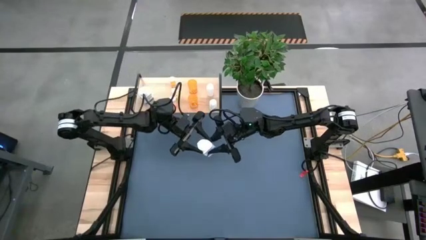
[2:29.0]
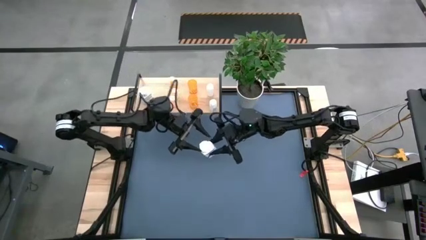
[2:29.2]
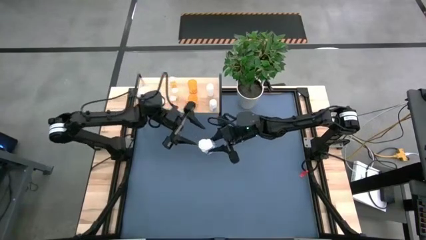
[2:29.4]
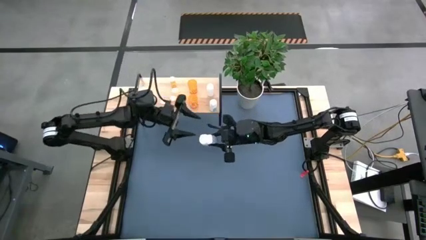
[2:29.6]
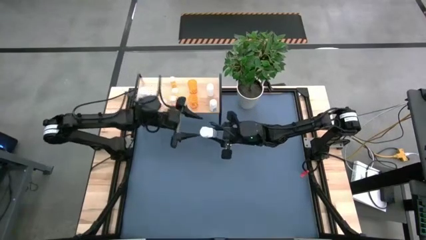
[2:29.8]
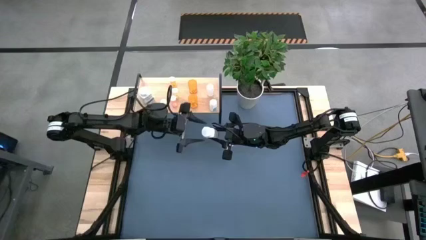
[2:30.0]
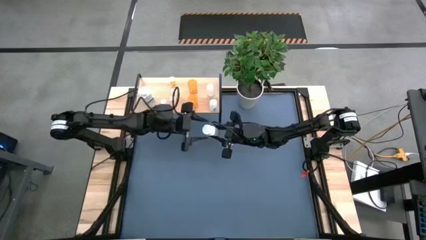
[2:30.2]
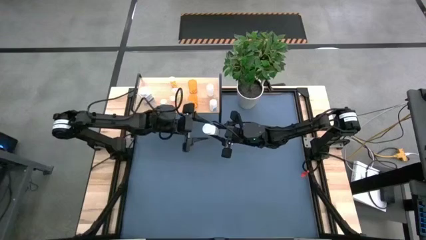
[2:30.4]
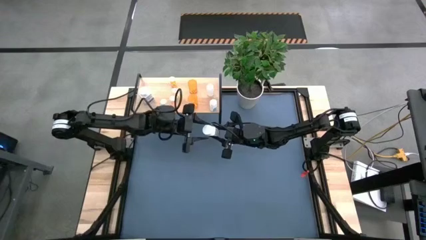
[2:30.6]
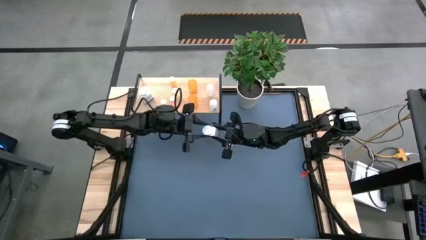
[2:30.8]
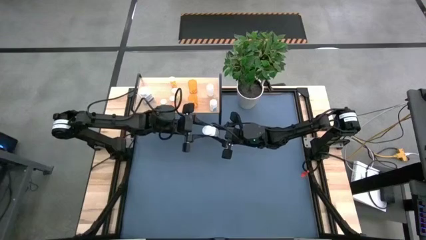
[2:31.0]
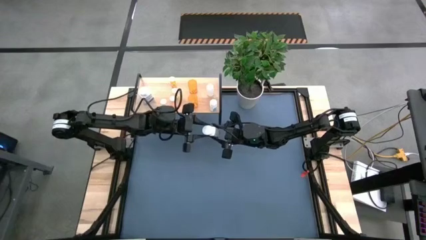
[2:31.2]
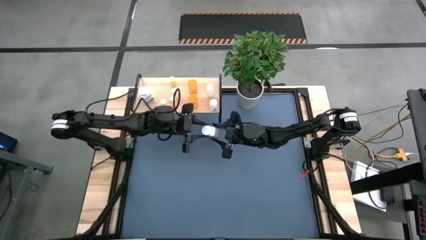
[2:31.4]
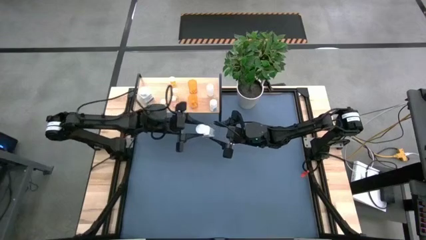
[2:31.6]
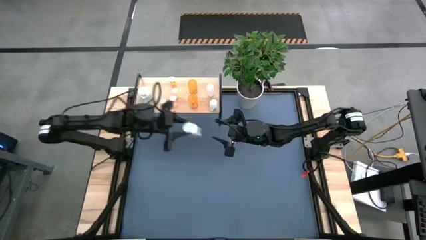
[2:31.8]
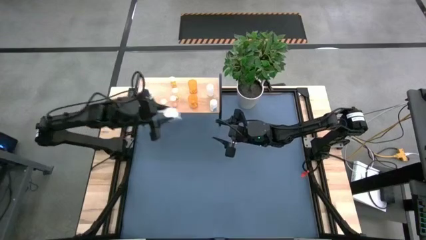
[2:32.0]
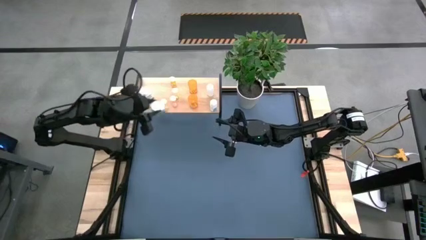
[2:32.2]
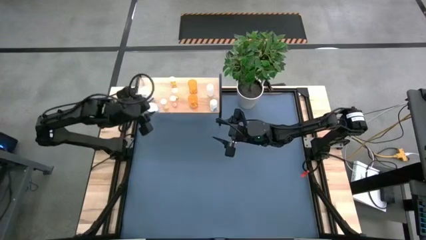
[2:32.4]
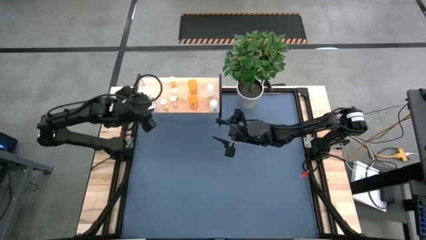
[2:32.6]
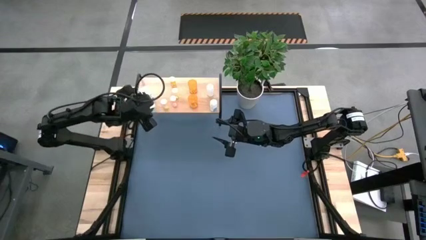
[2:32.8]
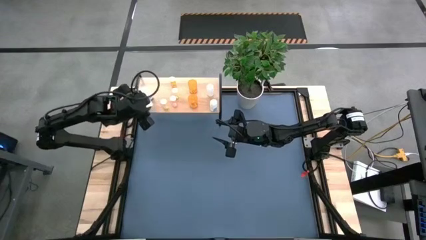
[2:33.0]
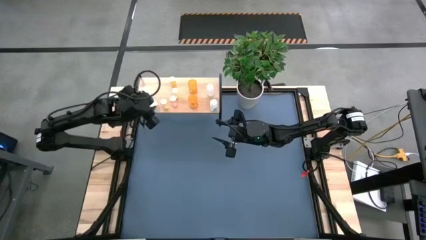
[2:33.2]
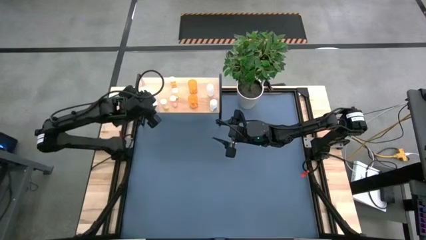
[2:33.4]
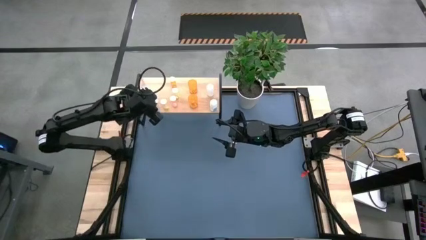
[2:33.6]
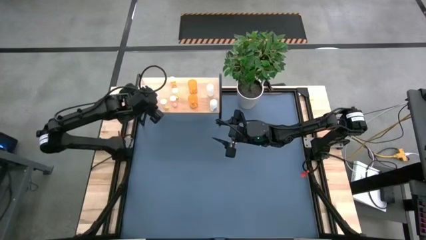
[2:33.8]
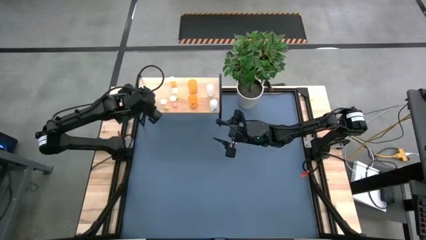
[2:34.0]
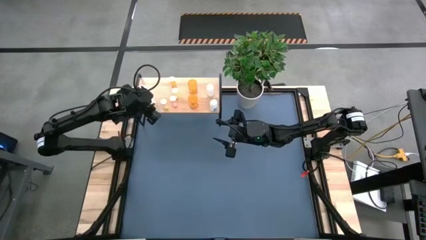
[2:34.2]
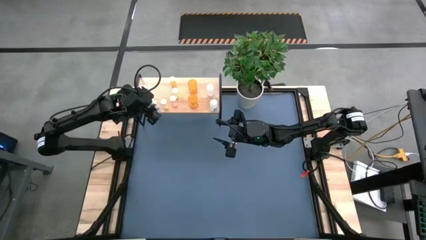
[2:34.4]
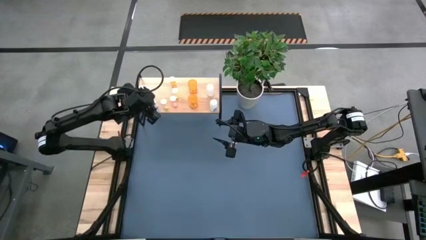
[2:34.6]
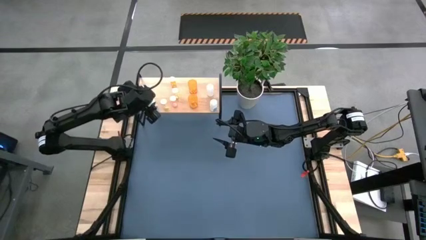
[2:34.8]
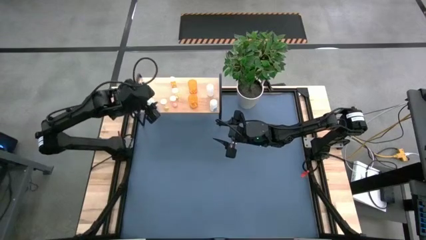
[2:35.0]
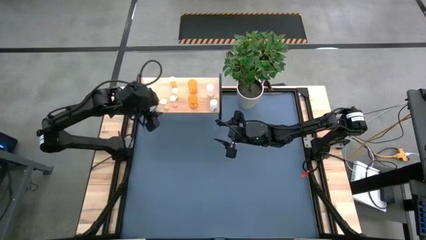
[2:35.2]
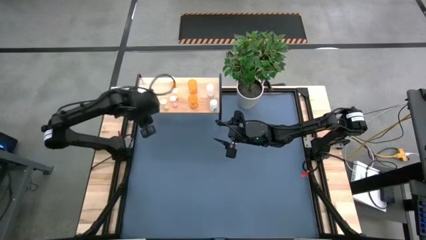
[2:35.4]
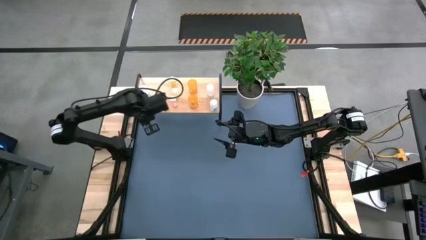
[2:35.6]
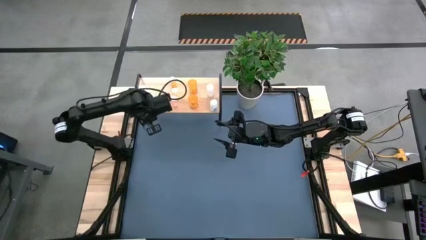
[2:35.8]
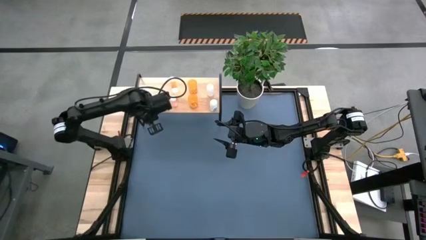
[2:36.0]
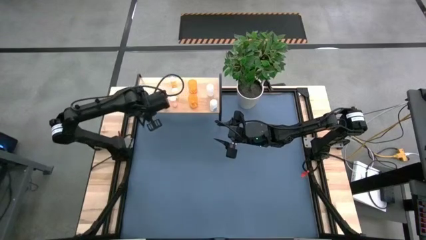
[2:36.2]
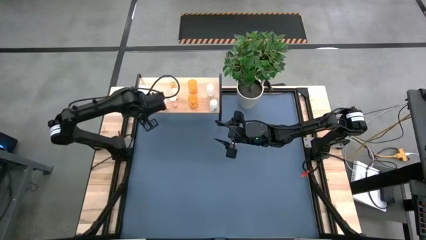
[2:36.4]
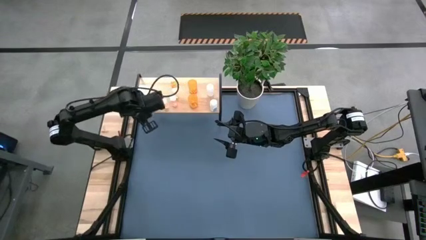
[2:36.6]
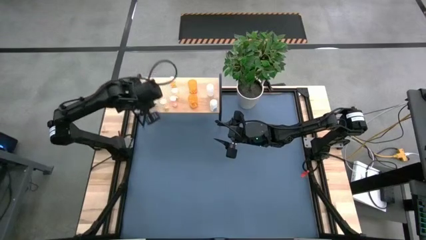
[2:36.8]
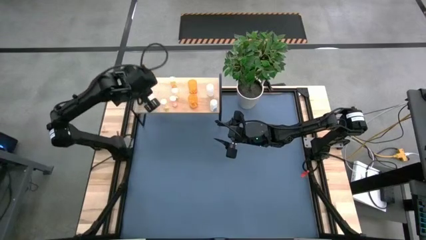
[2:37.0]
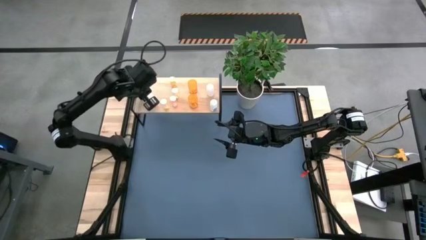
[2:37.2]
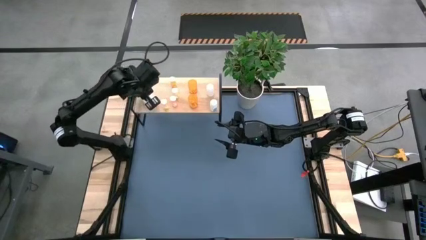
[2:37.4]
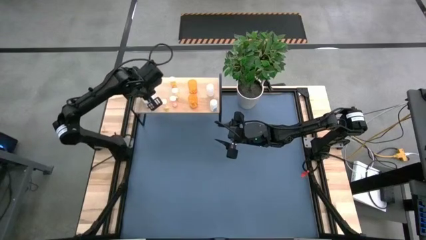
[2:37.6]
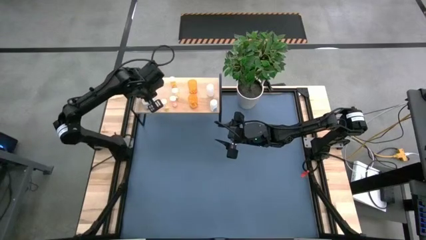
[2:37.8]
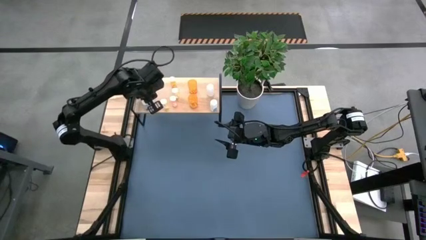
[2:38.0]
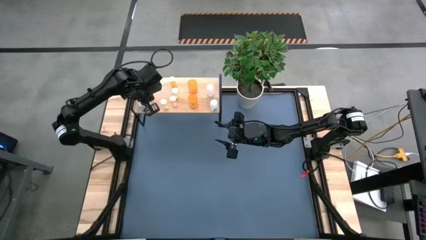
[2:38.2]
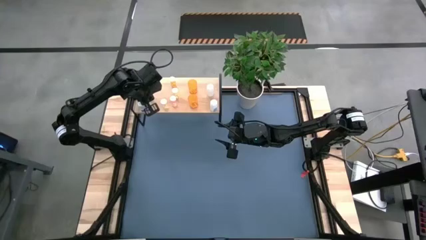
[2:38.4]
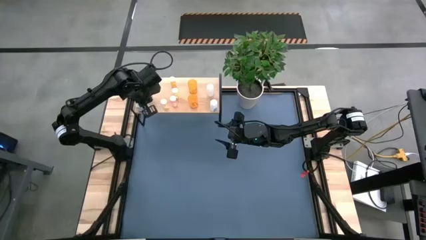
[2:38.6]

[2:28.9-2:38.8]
Task: Pick and place medicine bottles onto shelf by color
Put the white pill bottle on the shelf

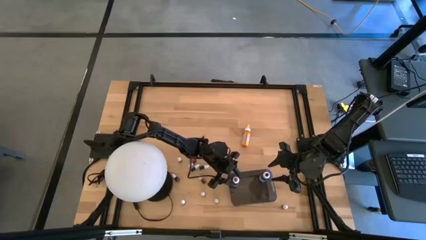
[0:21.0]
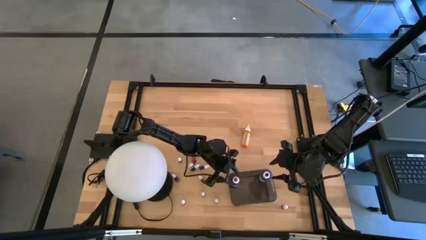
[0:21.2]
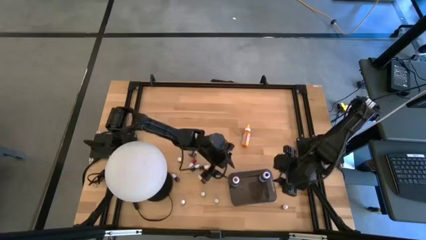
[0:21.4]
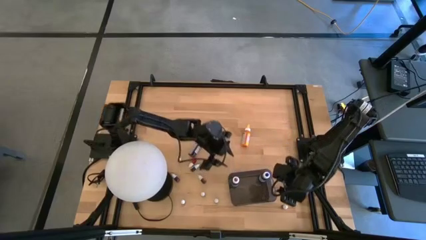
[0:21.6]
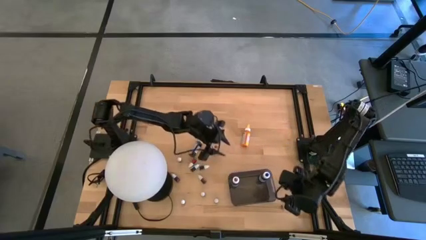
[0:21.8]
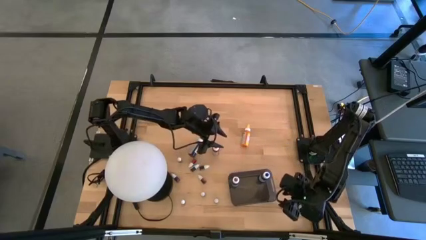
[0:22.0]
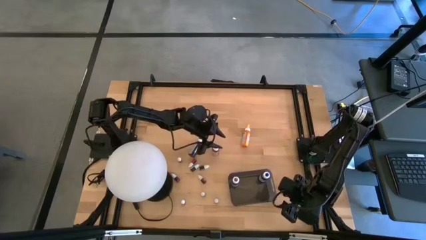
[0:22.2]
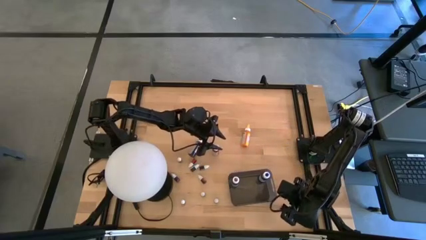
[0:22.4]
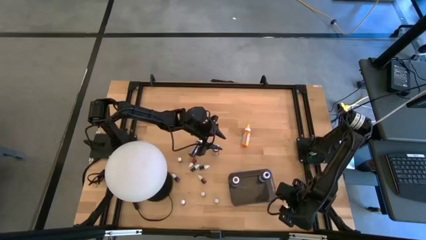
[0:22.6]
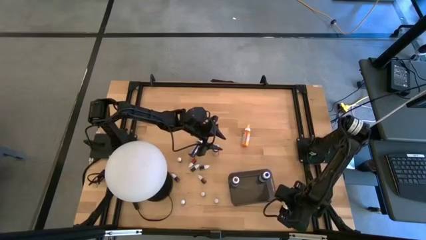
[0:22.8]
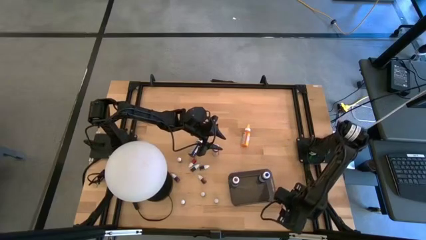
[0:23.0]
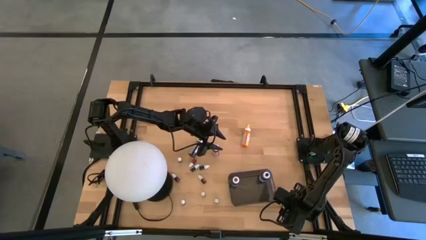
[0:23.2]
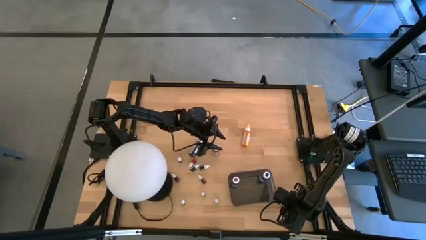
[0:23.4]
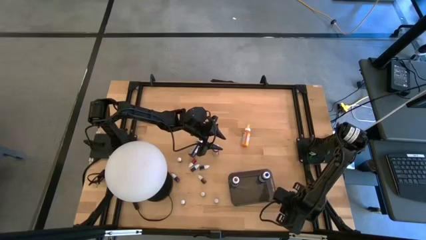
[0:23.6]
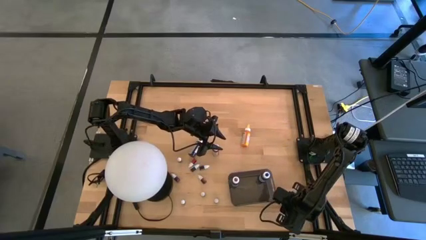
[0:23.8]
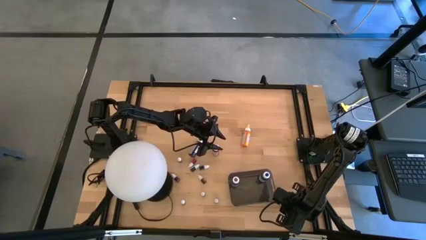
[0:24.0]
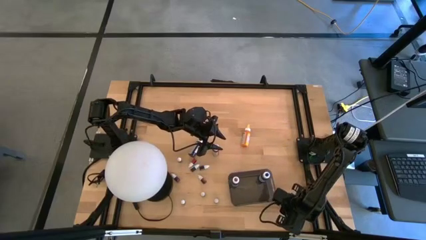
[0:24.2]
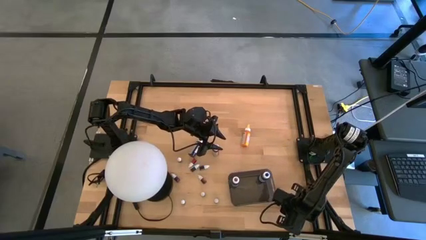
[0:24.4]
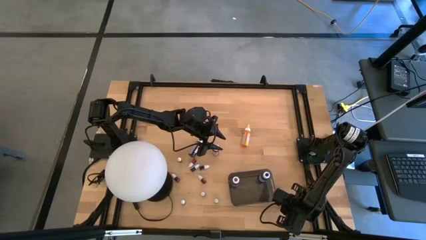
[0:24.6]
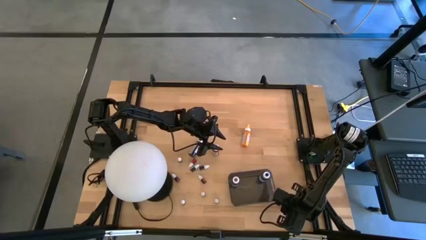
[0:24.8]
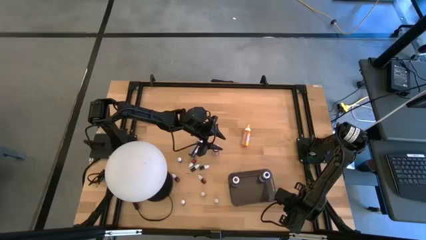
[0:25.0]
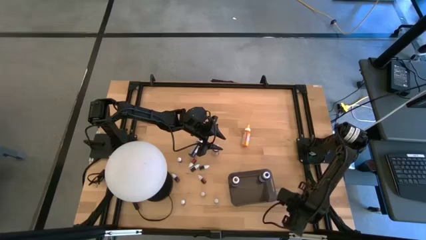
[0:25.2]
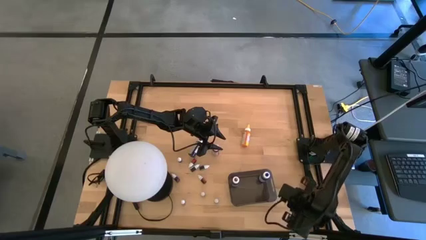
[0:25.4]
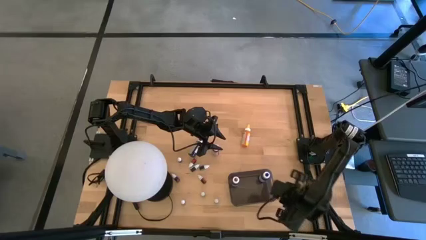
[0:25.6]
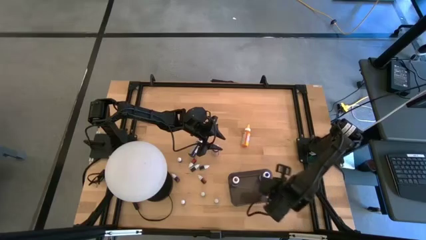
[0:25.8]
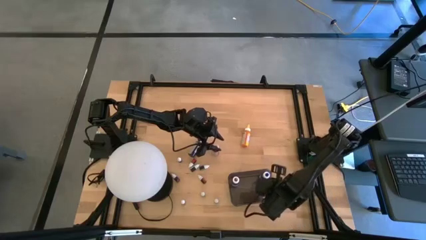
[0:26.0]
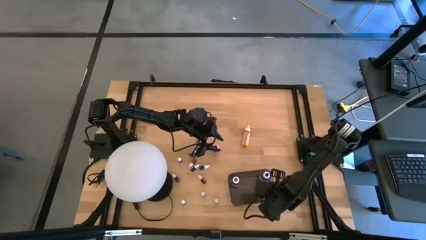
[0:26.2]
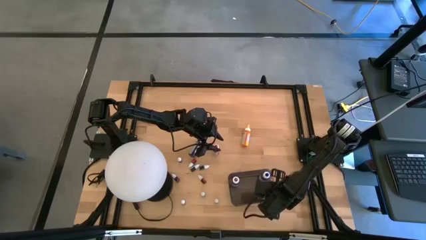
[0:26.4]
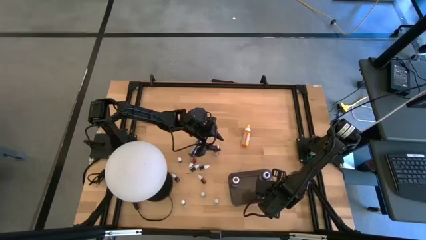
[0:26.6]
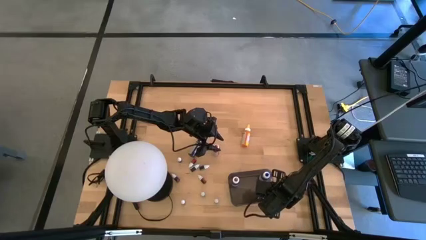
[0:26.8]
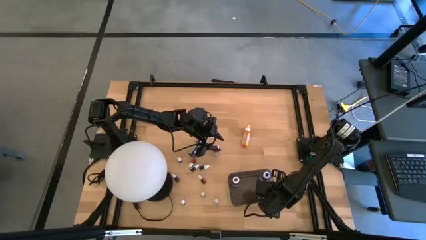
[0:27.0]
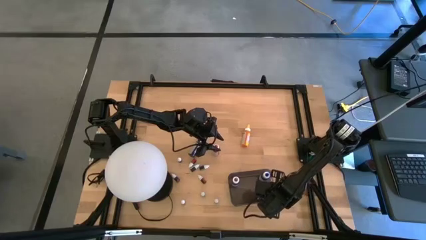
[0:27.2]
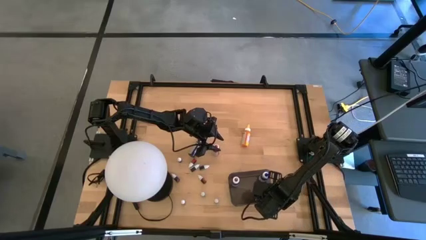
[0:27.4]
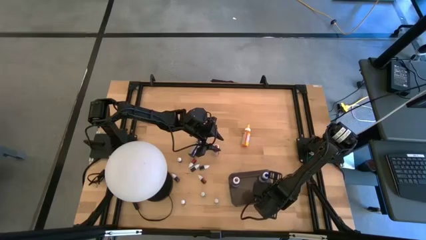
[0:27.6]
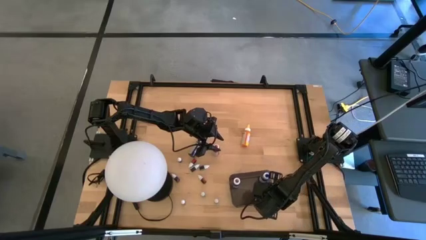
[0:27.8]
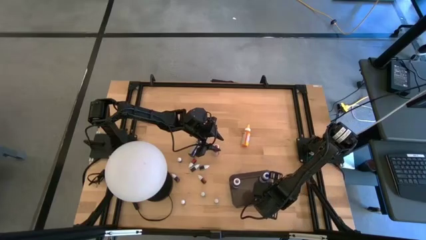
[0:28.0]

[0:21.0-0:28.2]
Task: Pick & Place food coloring
Put the small red food coloring bottle into the bin
